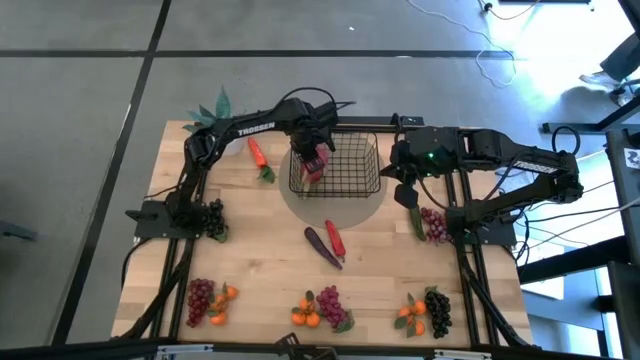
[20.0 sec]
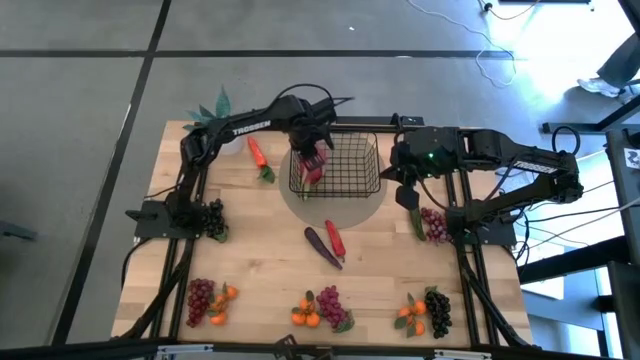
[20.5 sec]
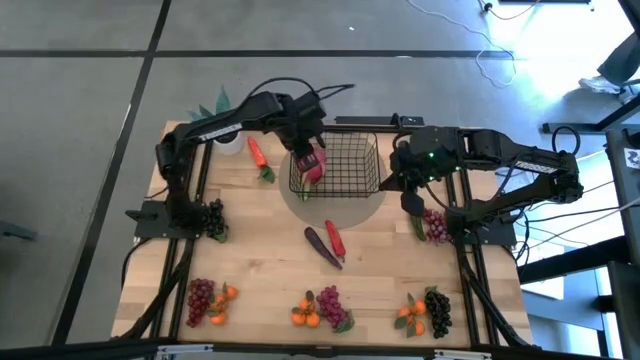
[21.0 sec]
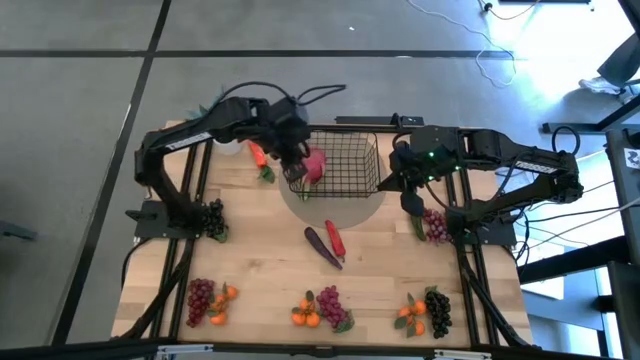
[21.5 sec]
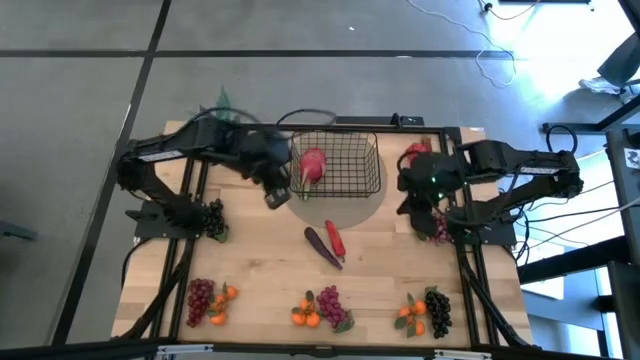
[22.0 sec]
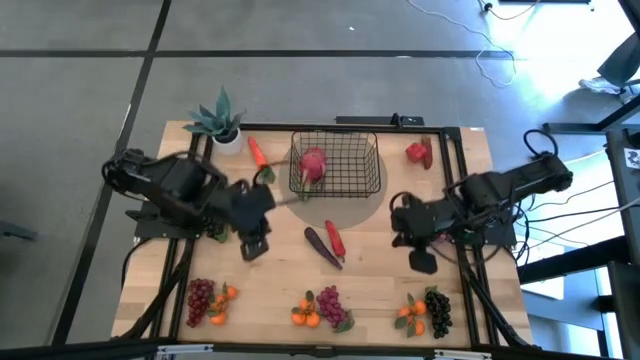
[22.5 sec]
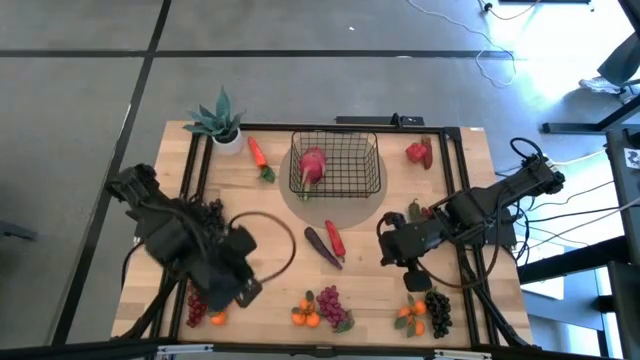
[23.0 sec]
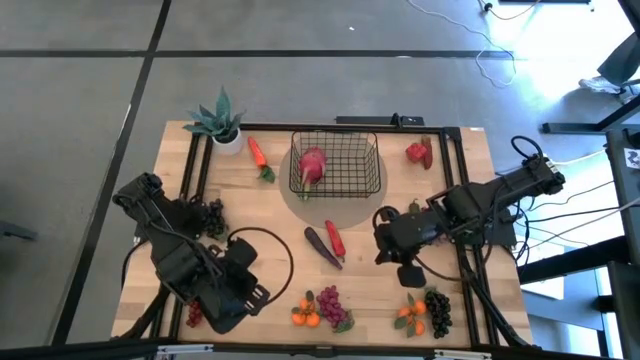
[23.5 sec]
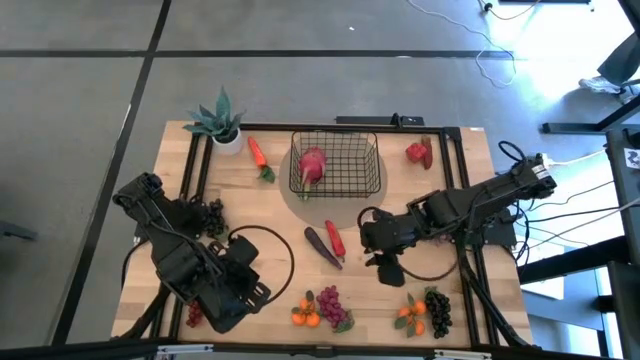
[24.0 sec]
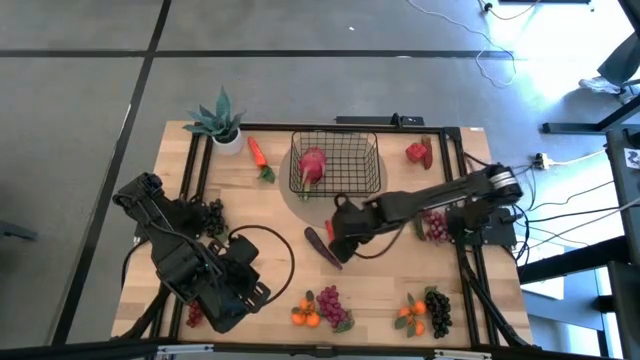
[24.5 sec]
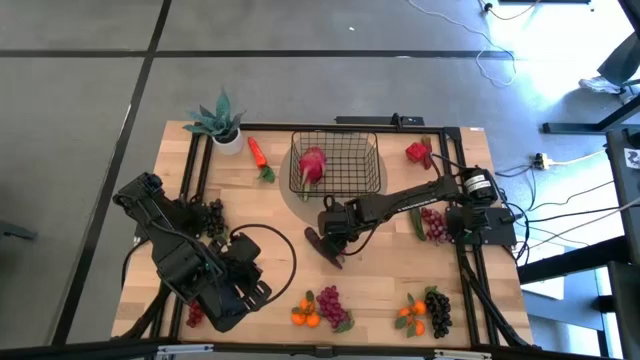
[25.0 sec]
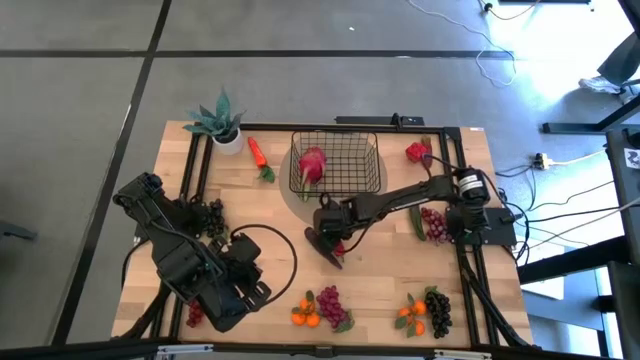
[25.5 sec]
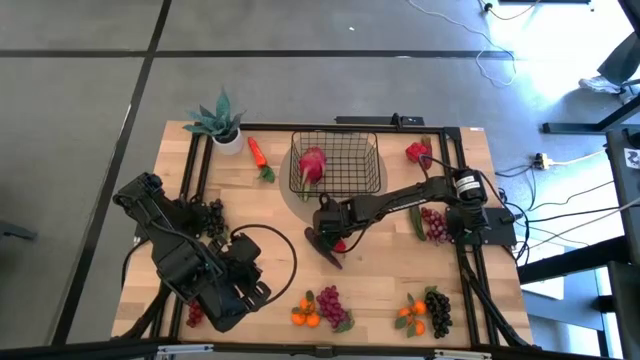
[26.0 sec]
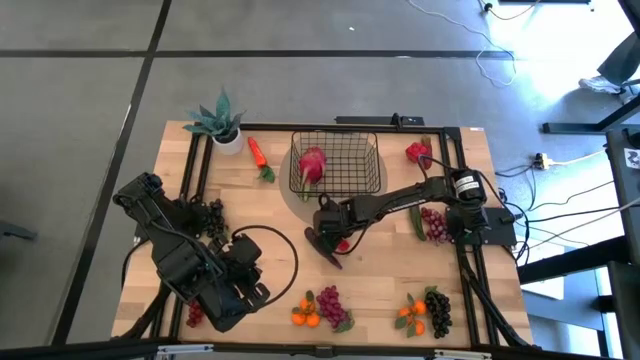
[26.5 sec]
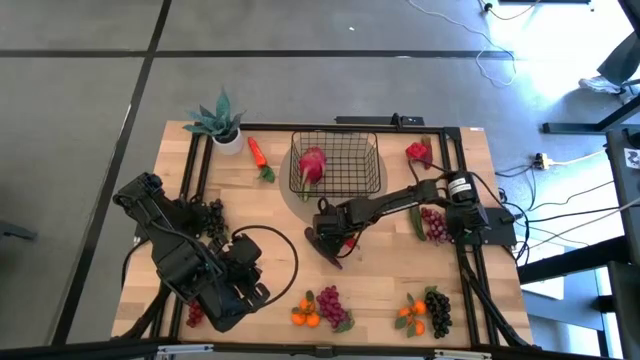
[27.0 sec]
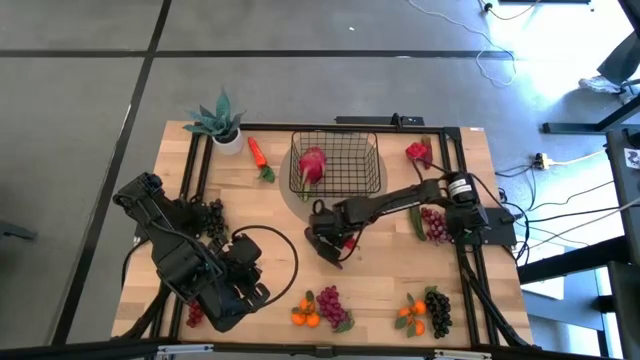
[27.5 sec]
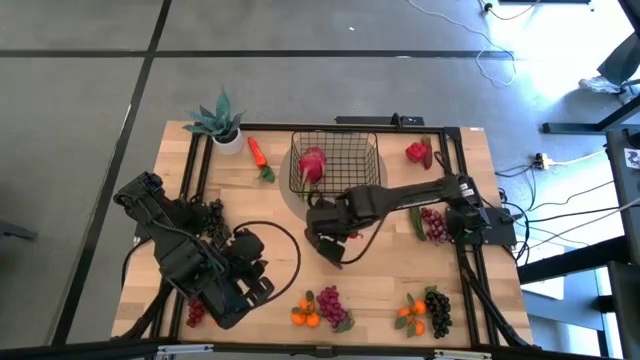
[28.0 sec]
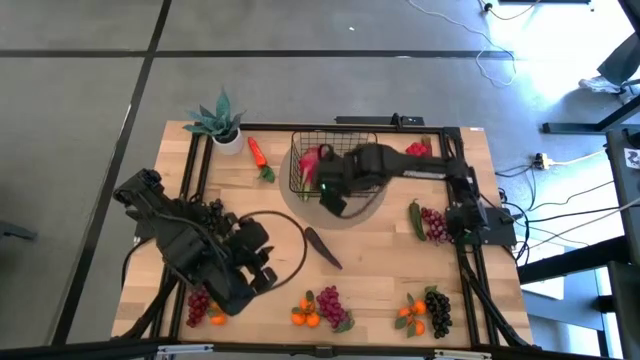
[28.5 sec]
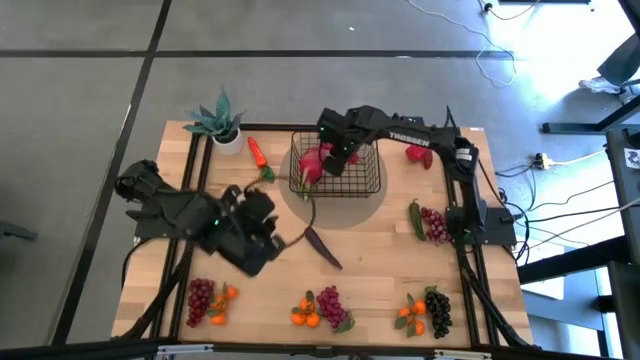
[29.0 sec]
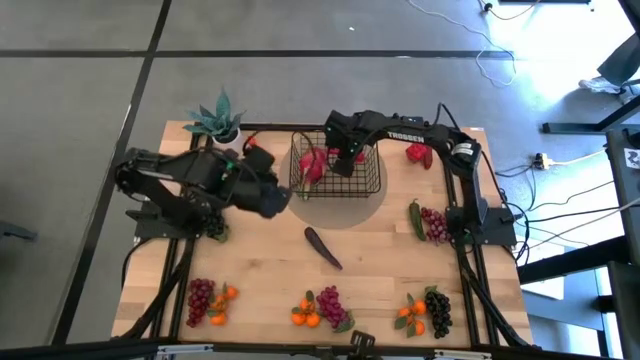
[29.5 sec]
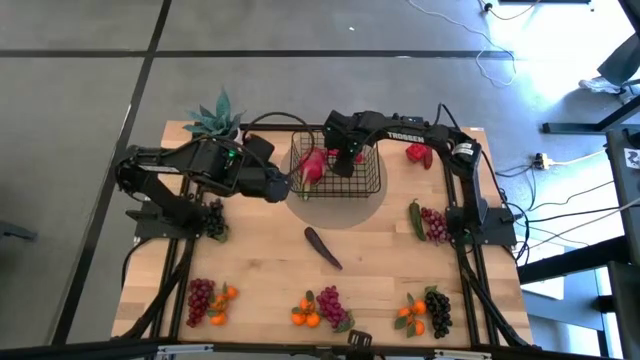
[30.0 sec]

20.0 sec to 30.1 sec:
Task: Build produce basket
Put the red chili pepper into the black wire basket

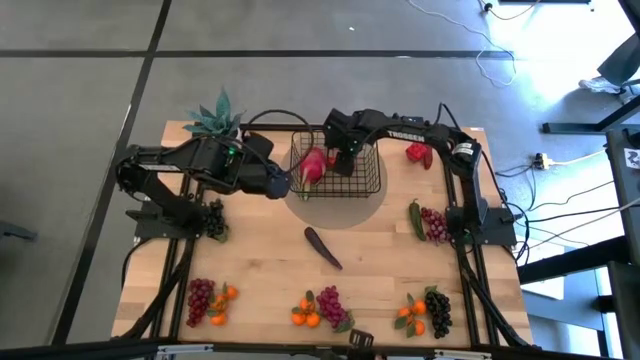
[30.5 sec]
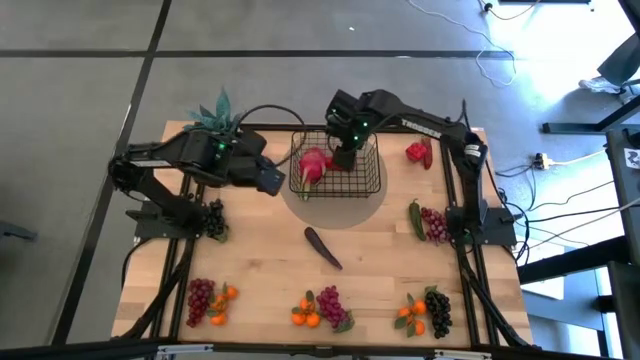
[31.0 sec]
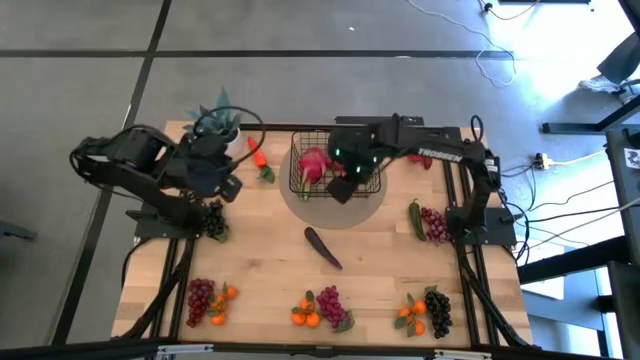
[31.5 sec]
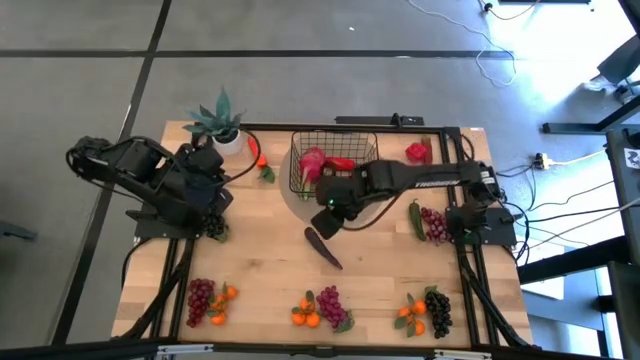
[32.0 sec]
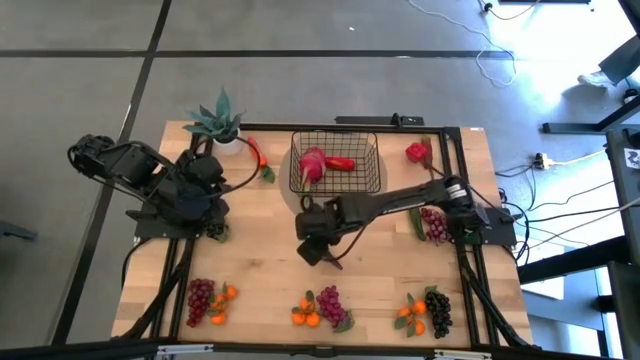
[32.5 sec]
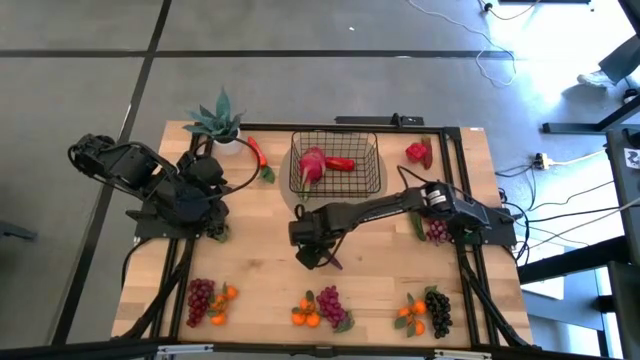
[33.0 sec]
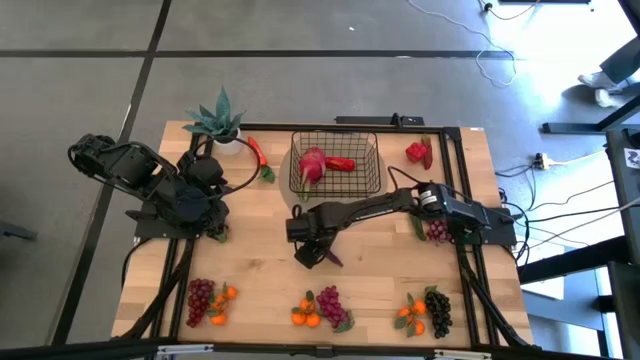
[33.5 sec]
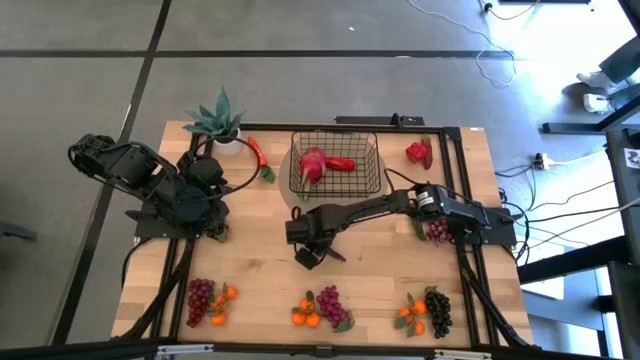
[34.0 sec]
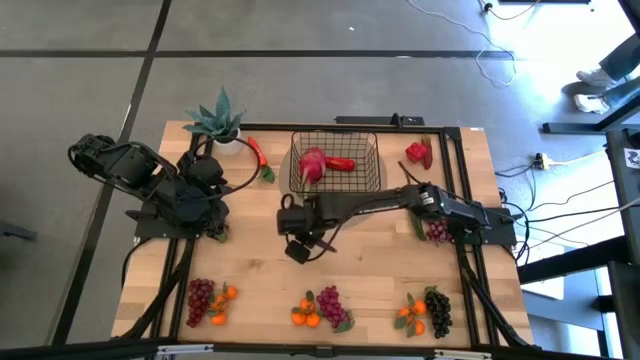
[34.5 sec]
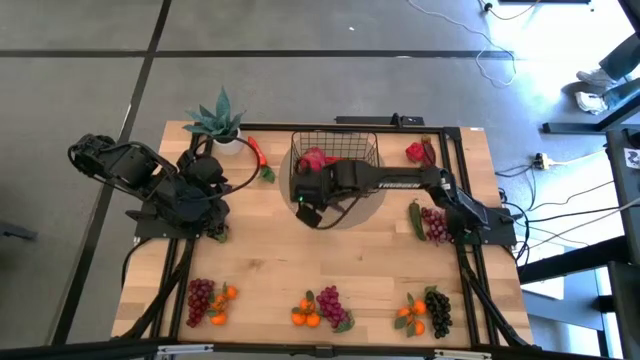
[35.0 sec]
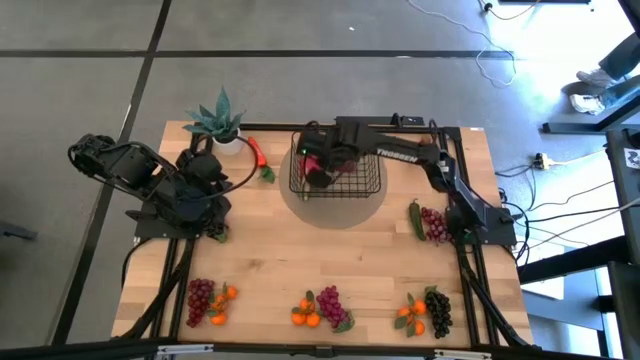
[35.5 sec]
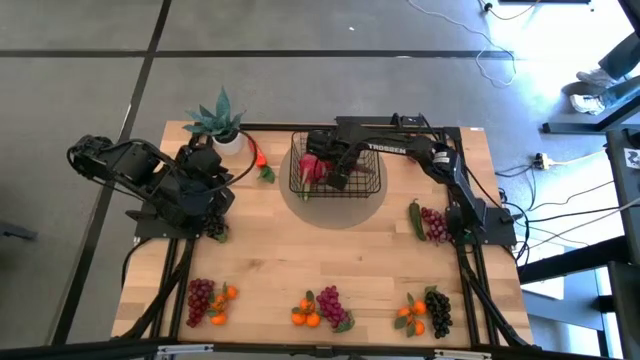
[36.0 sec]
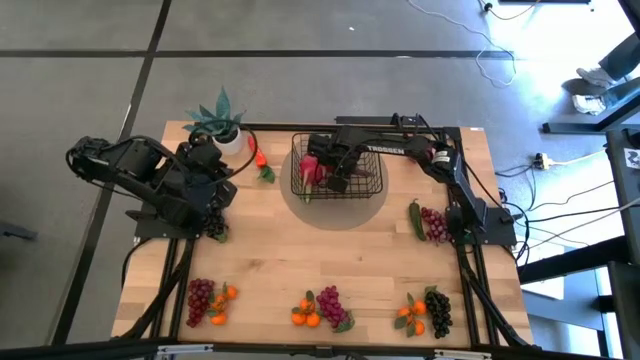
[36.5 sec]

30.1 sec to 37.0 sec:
Put the purple eggplant into the black wire basket

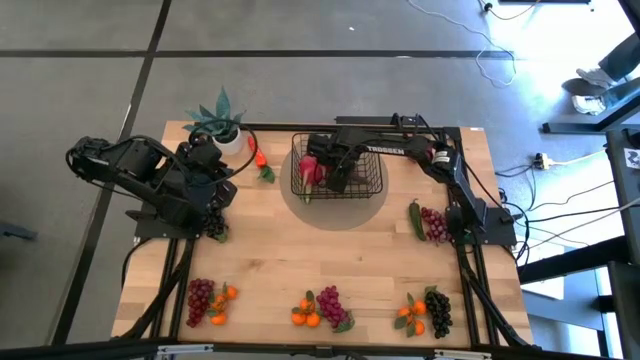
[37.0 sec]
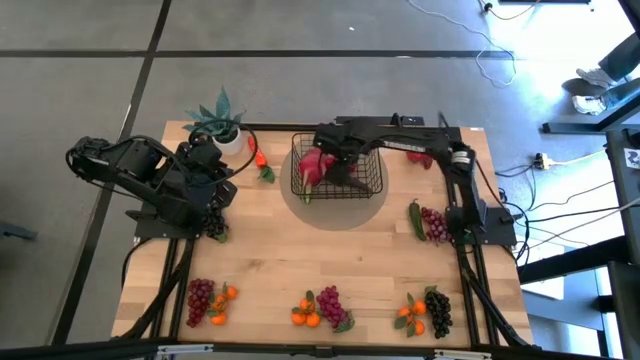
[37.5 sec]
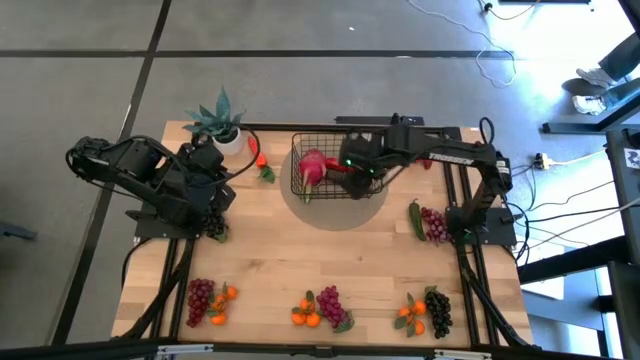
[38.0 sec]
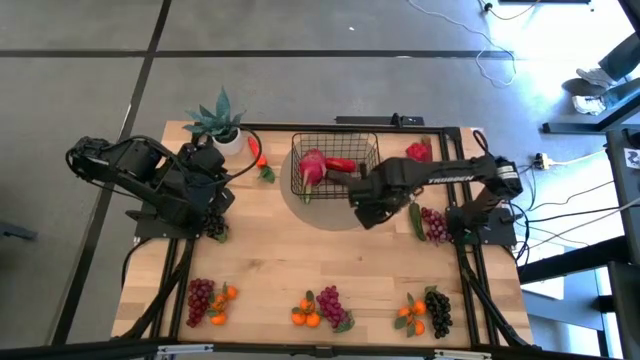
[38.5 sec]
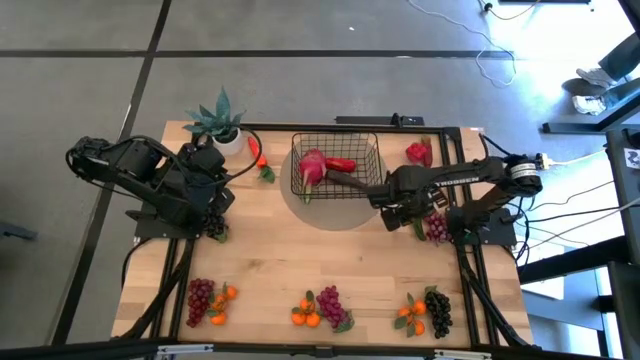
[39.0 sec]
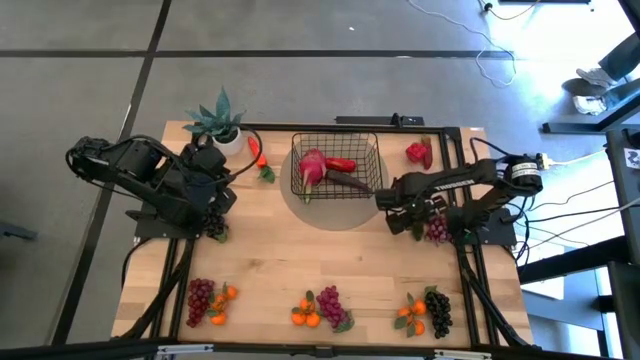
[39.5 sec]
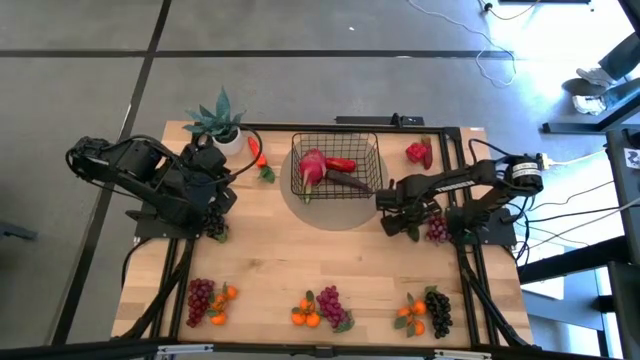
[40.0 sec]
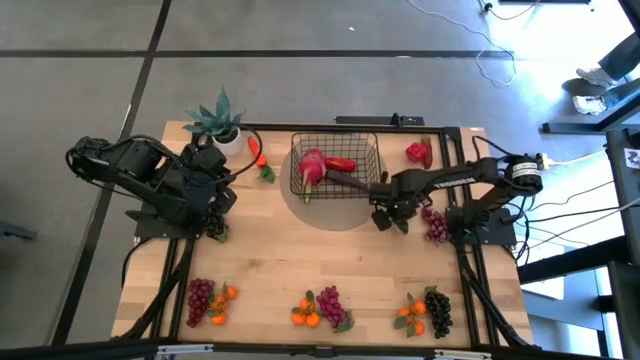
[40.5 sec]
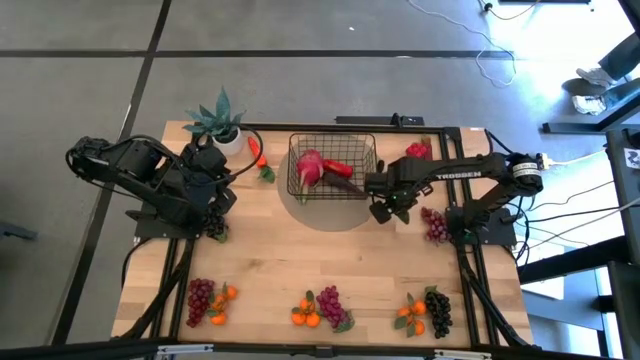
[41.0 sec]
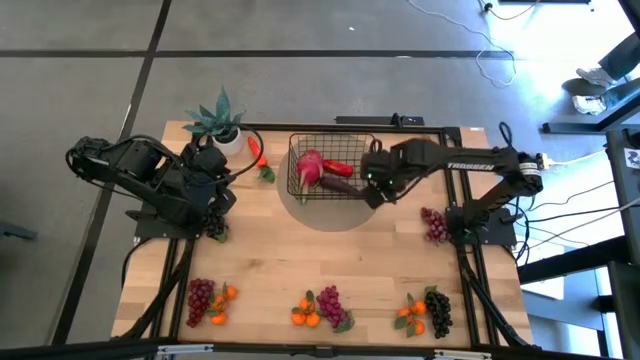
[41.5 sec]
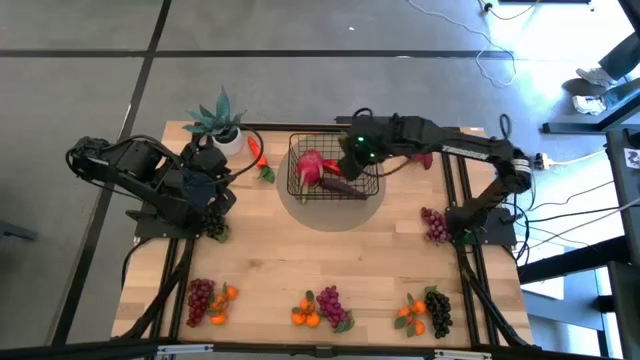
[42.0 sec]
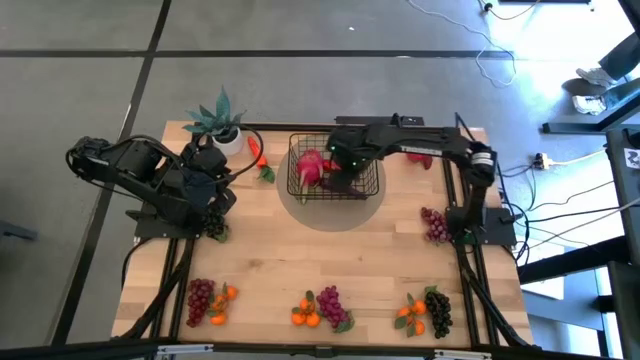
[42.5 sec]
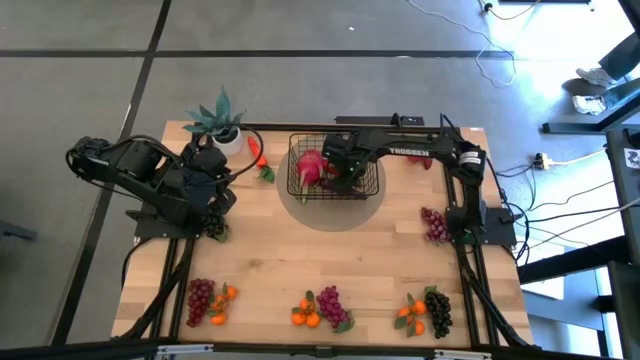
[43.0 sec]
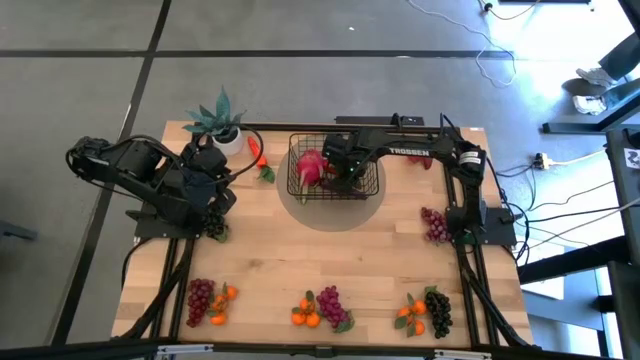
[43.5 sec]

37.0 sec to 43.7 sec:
Put the green chili pepper into the black wire basket
